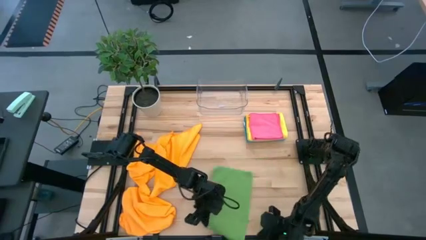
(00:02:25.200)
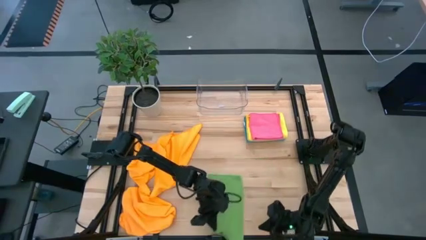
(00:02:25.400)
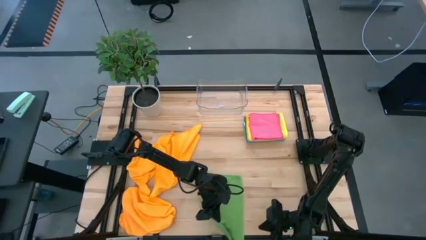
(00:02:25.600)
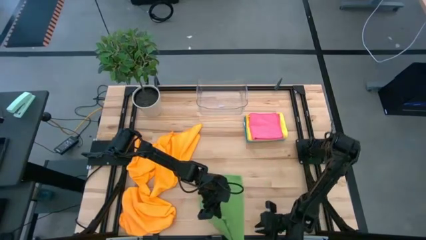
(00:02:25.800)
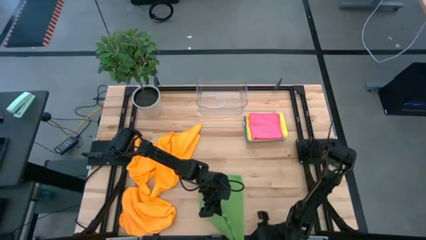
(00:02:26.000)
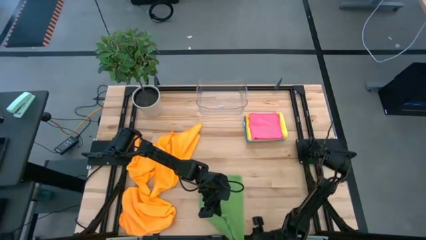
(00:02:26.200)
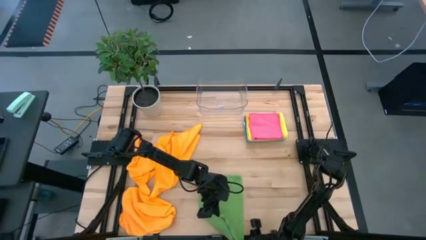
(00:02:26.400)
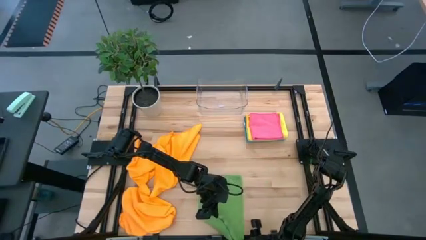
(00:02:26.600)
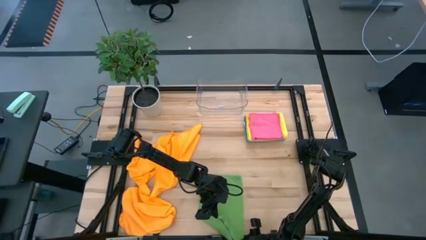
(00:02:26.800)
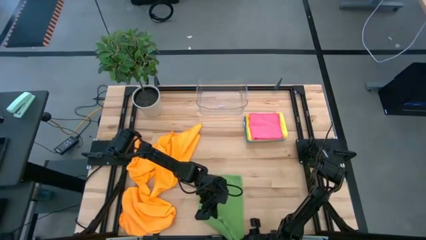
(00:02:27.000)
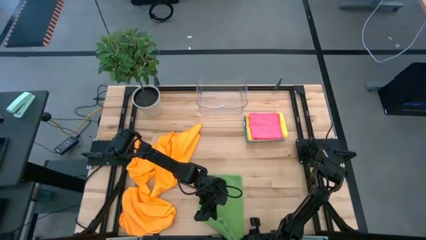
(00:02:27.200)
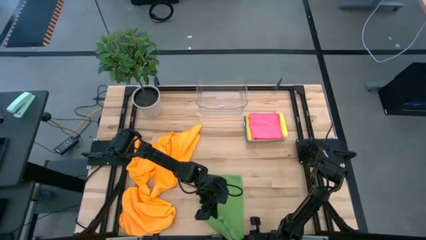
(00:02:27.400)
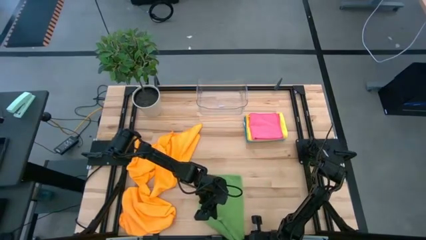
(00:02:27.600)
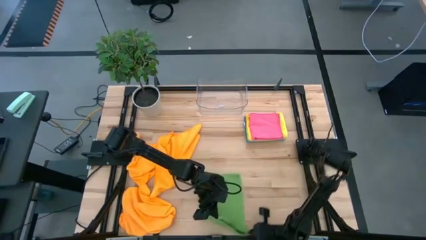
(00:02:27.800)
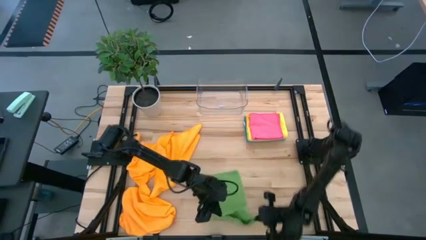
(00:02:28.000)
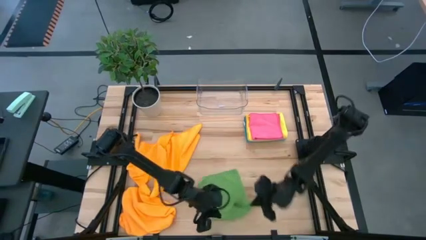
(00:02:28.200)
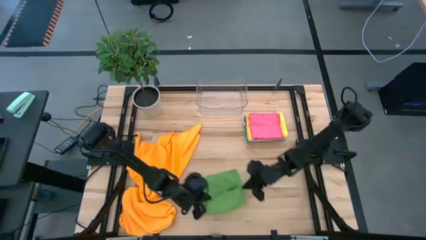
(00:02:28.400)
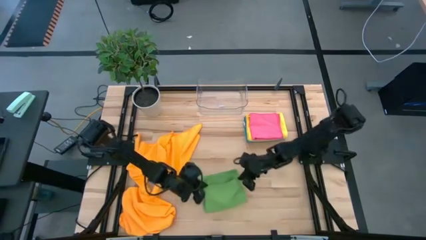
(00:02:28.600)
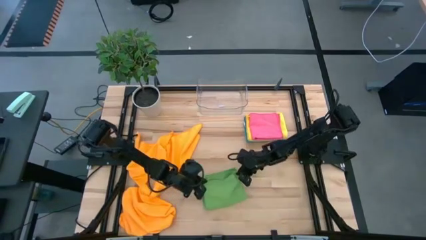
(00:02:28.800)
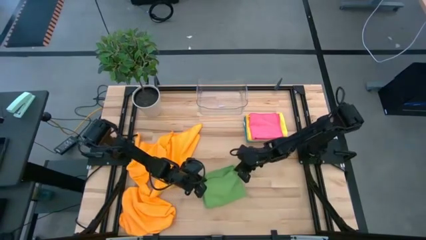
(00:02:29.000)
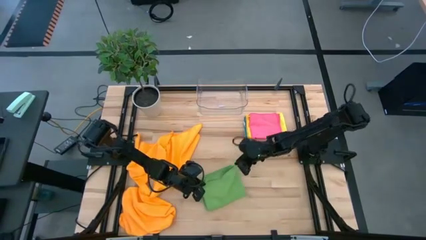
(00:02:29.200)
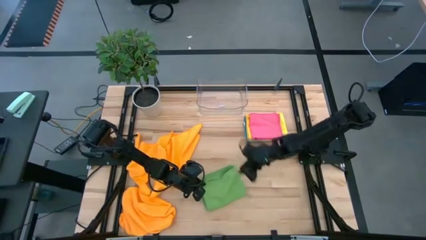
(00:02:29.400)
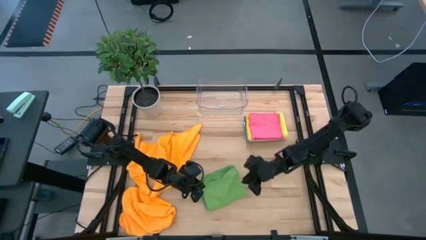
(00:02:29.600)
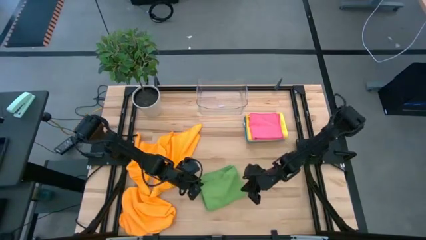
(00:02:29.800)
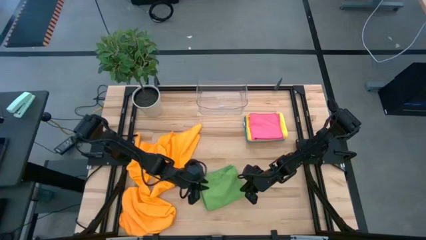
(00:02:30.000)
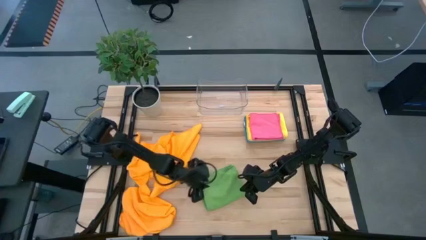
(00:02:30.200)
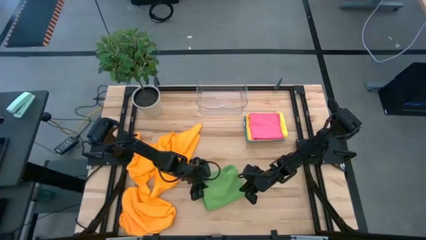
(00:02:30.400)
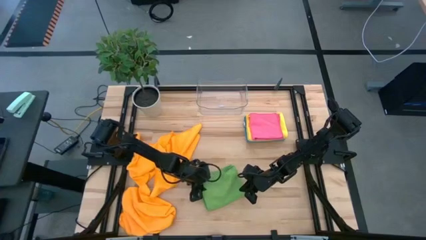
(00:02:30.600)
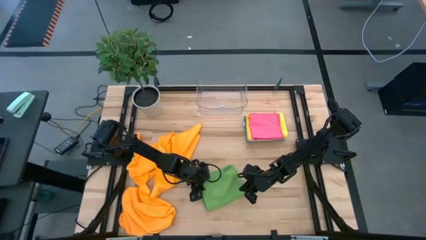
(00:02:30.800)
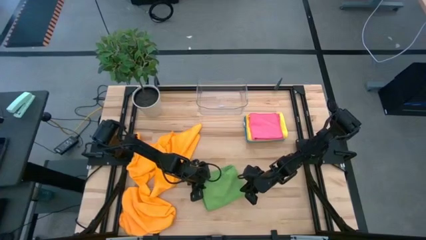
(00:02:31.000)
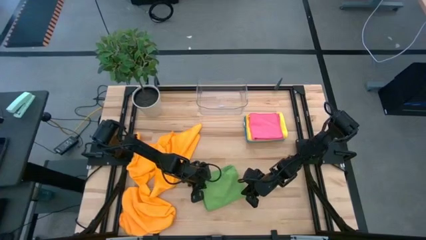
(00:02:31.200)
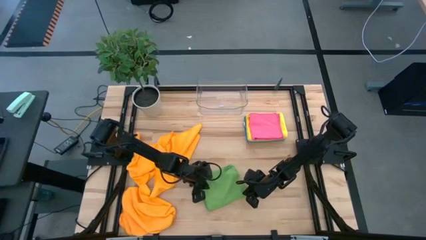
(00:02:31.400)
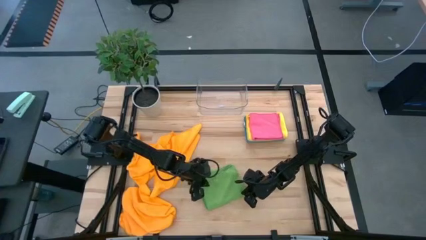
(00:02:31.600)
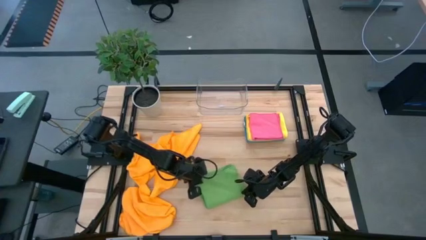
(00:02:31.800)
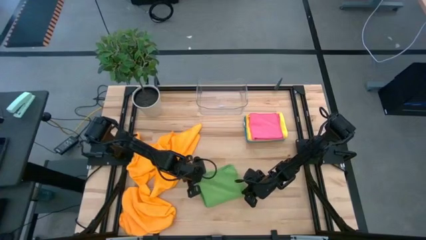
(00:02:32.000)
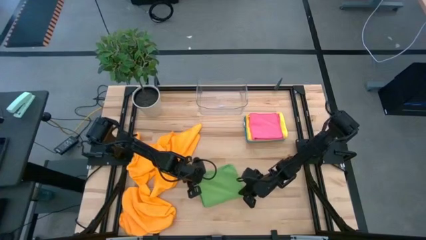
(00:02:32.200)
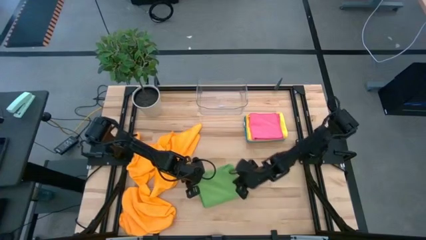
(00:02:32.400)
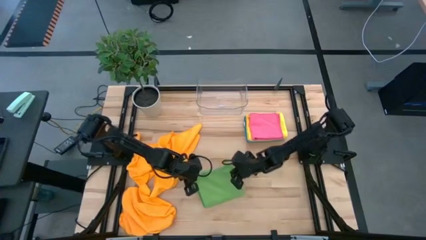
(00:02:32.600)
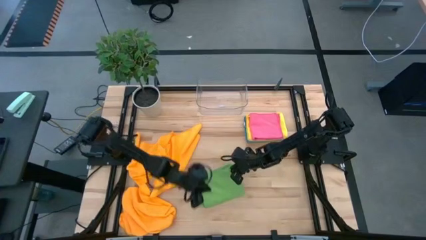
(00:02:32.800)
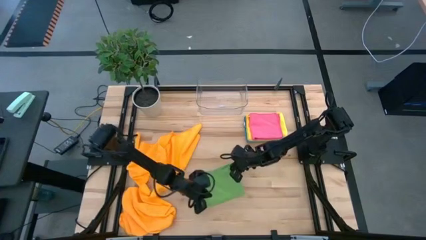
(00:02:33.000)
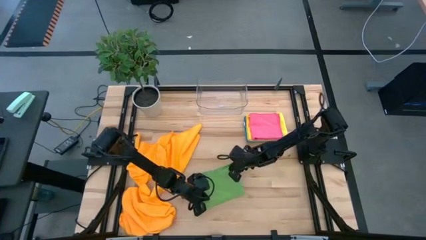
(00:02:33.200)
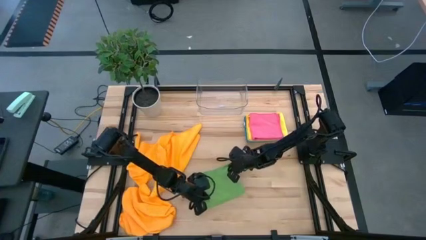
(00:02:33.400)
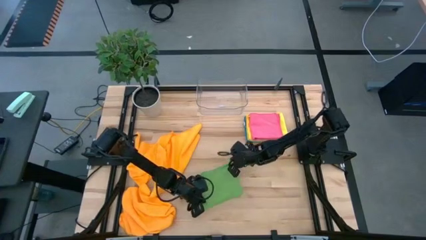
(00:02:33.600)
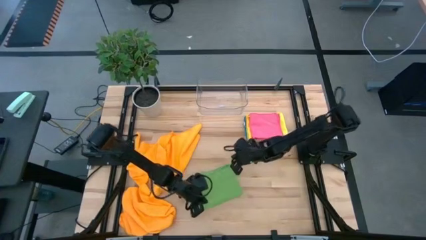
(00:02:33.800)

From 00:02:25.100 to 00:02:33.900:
Task: Fold microfiber towels
Fold the green towel

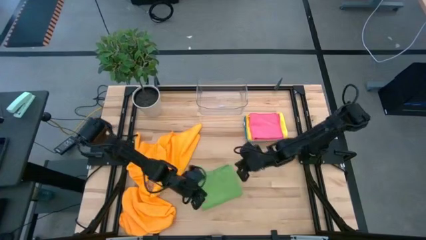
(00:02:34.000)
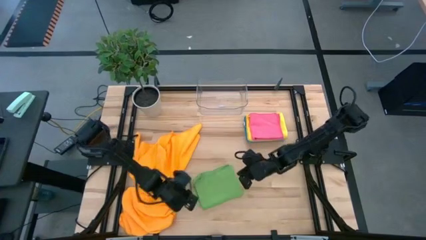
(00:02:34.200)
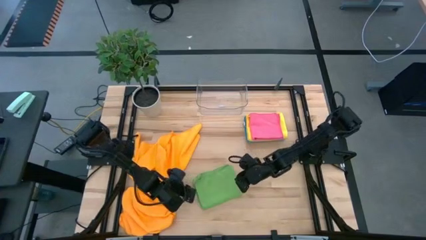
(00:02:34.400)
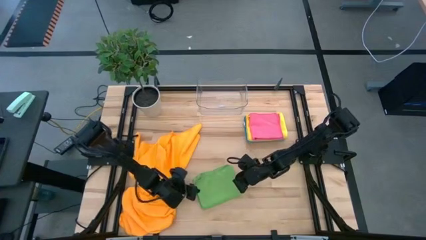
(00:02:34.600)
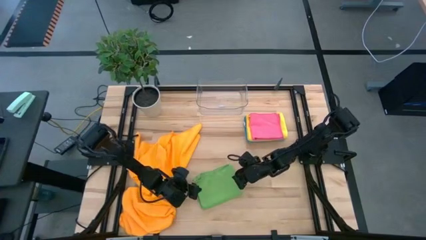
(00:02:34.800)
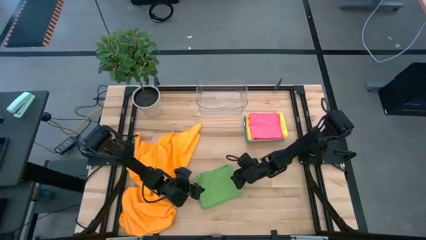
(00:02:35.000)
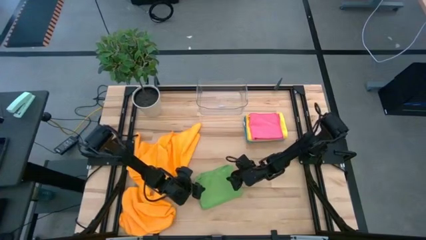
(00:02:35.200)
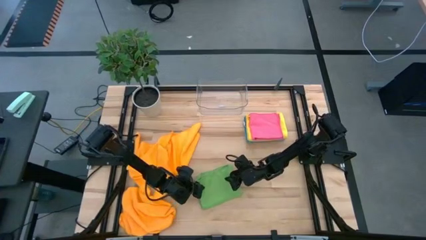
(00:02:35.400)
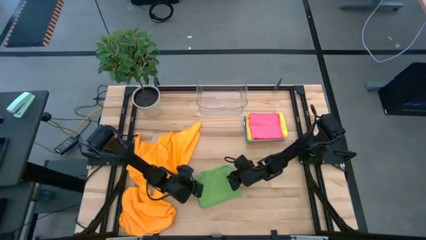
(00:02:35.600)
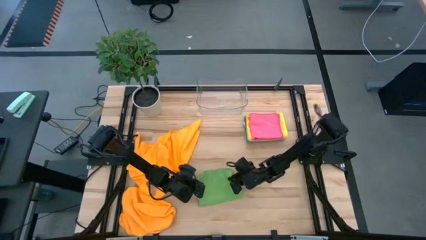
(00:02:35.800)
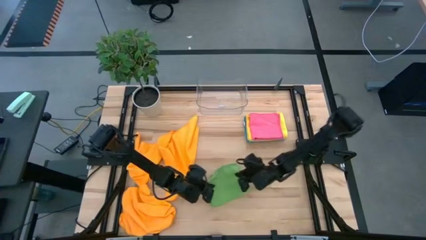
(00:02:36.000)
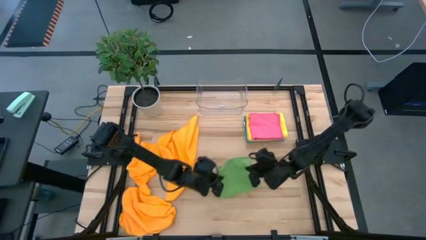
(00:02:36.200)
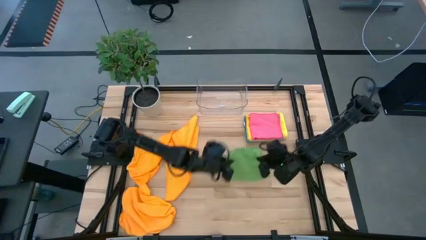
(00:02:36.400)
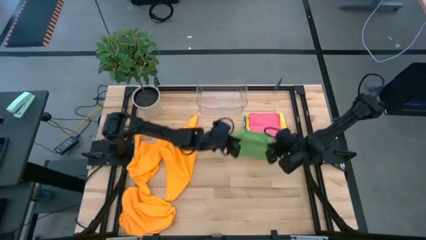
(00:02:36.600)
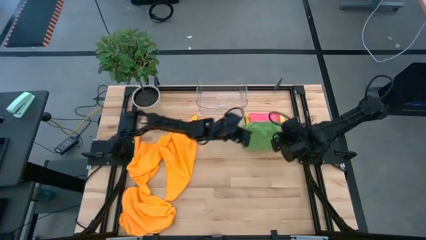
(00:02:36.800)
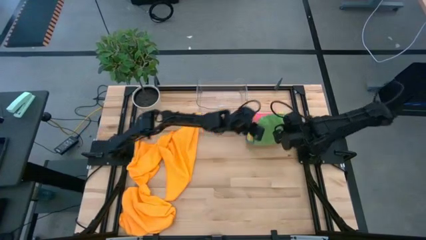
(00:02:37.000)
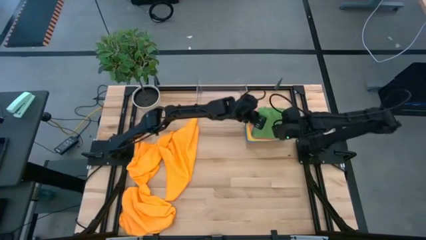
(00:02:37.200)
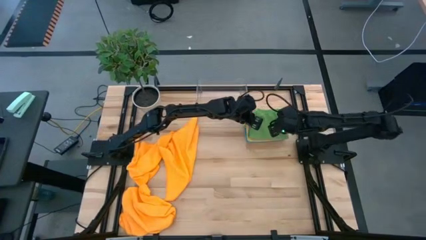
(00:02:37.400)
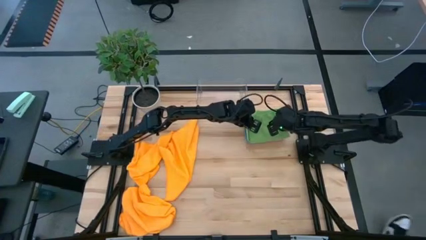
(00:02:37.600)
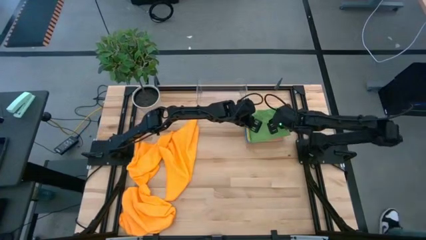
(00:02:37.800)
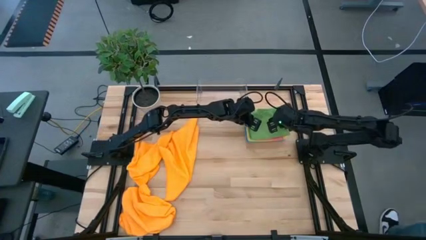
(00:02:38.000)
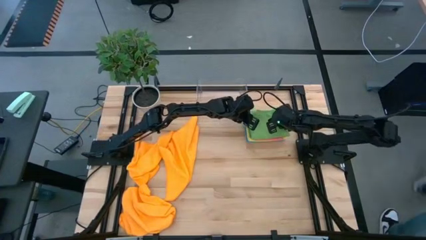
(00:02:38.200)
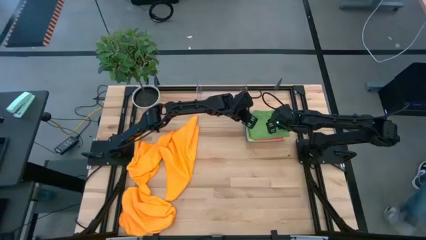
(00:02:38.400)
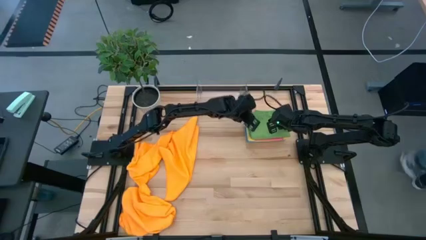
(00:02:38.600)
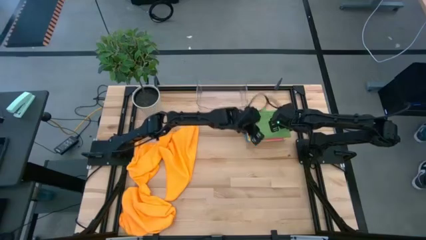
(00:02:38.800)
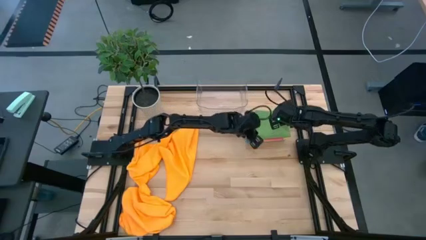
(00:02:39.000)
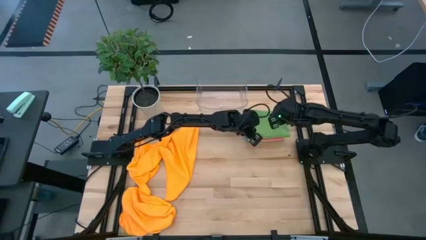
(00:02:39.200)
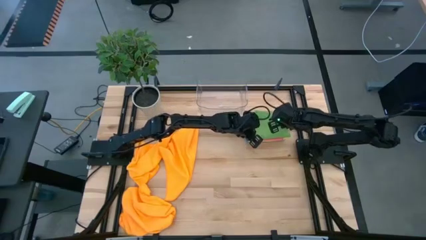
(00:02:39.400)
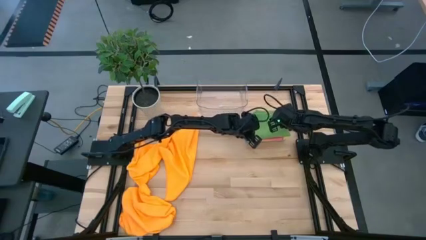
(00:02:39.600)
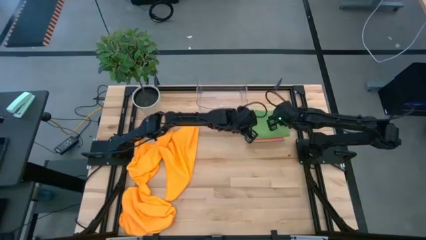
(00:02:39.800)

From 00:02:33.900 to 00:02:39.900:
Stack the green towel on the top of the pink towel

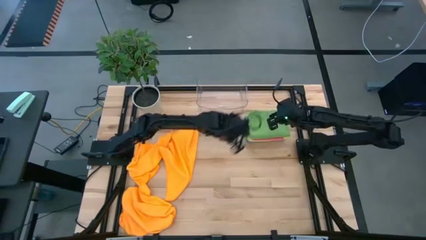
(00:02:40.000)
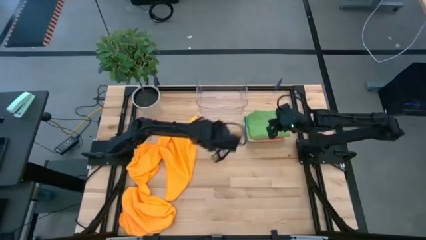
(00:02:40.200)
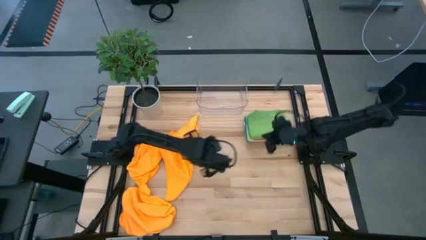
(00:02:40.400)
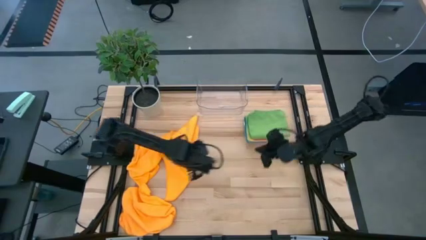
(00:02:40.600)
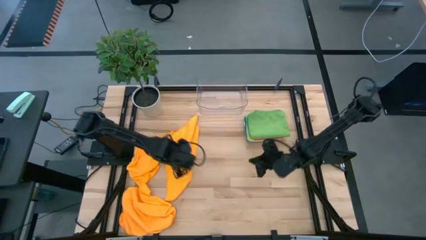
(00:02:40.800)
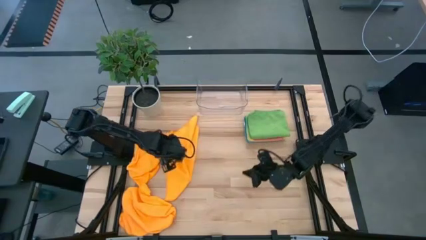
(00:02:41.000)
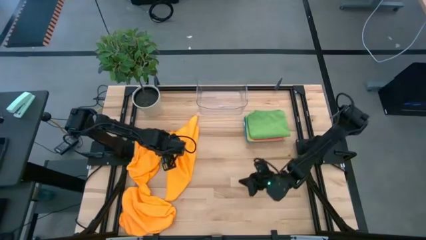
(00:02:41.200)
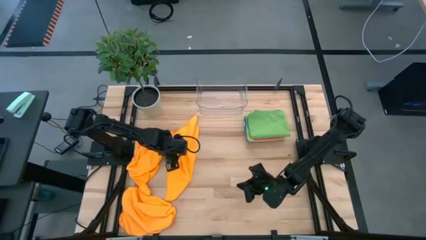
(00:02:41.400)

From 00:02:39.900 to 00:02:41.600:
Fold the top right orange towel

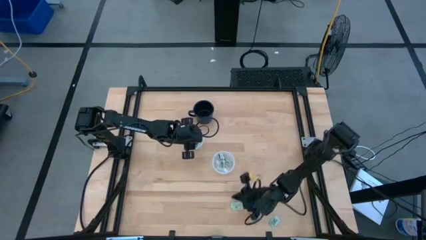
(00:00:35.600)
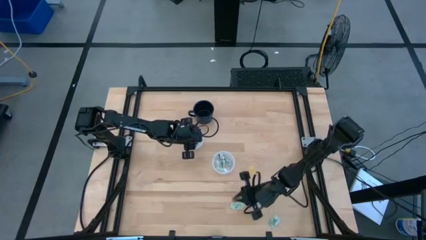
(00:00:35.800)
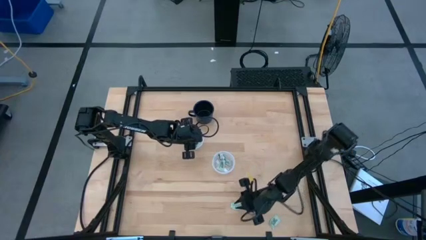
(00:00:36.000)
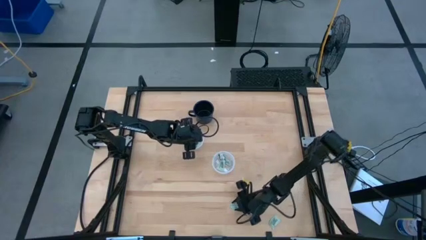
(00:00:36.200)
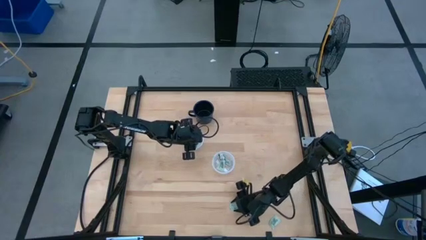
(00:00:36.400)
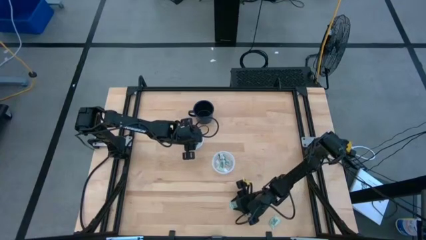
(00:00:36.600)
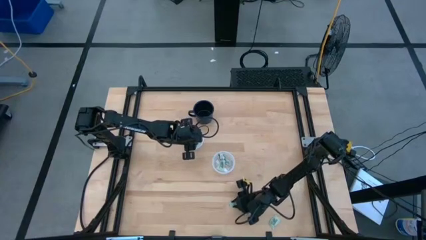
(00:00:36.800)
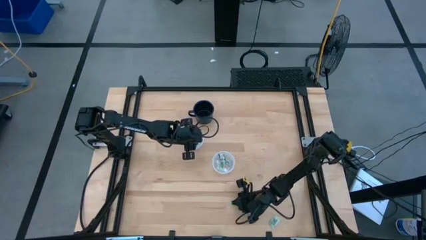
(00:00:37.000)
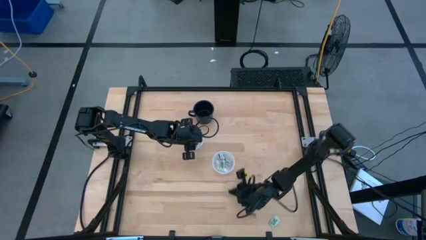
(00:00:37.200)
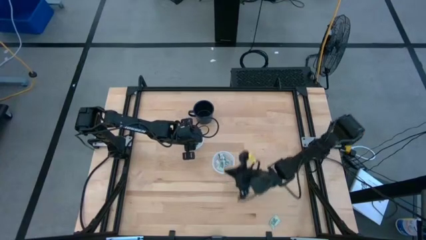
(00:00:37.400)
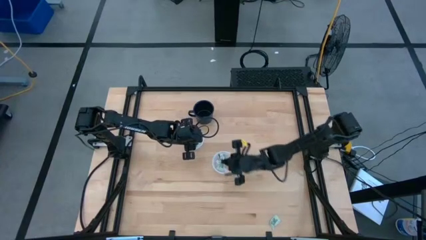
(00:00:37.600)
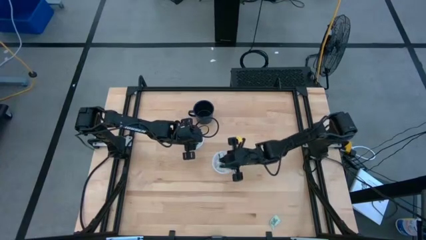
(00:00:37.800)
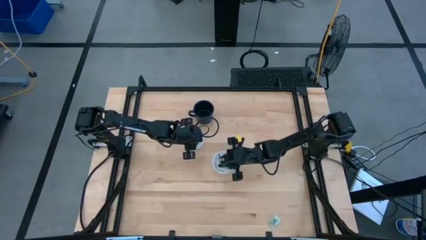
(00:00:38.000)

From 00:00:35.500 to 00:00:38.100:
Task: Pick and place Stevia / Truvia into bins
Put the stevia packet into the bottom round transparent container
